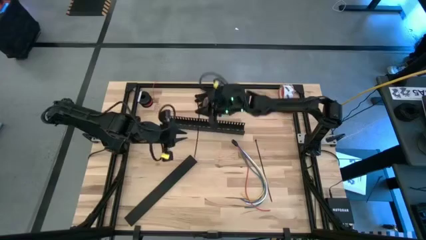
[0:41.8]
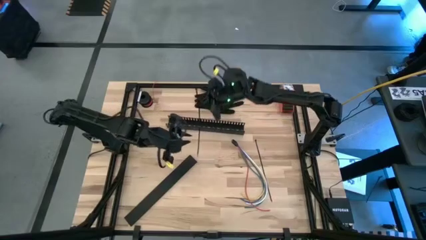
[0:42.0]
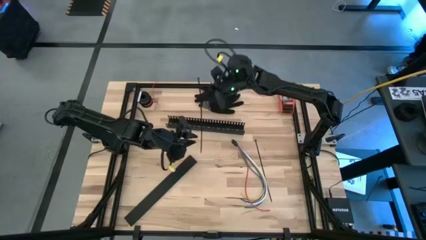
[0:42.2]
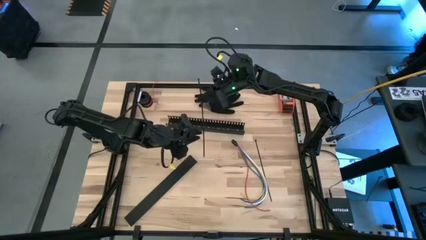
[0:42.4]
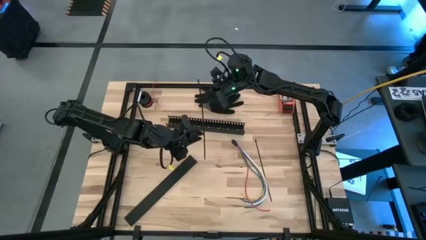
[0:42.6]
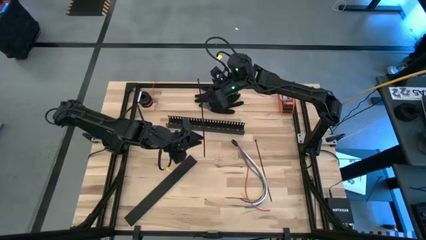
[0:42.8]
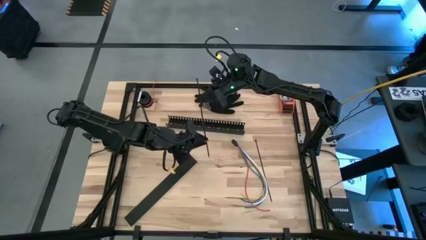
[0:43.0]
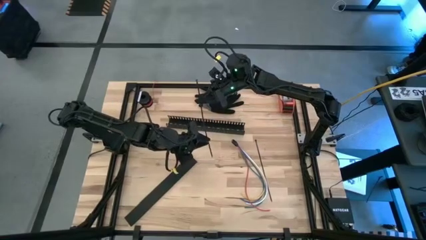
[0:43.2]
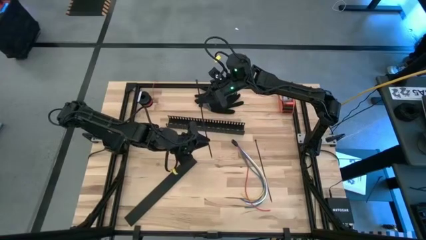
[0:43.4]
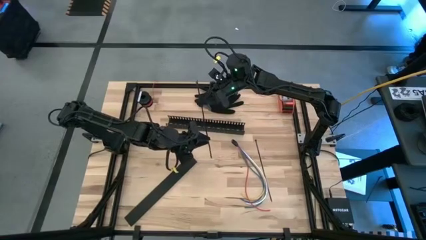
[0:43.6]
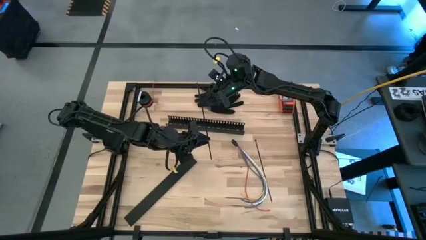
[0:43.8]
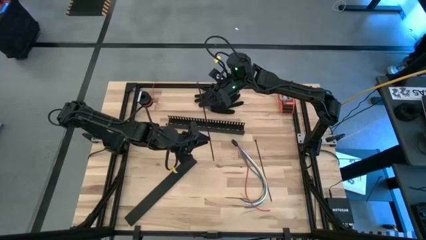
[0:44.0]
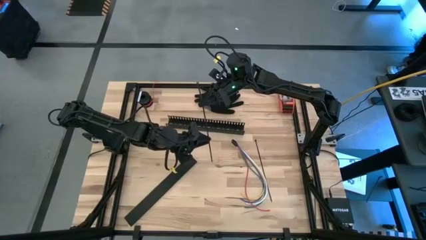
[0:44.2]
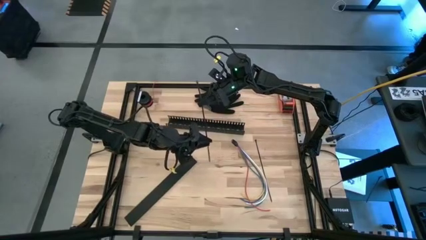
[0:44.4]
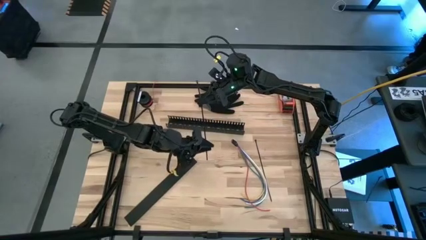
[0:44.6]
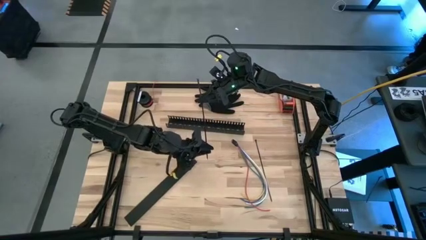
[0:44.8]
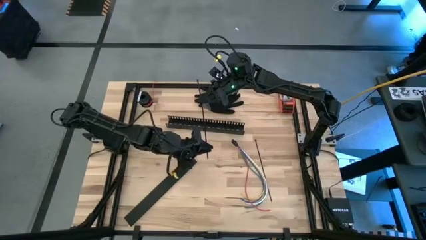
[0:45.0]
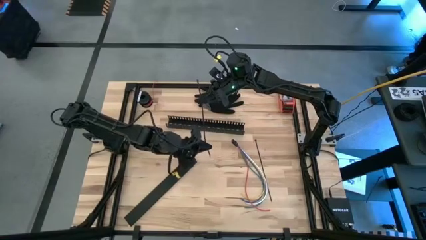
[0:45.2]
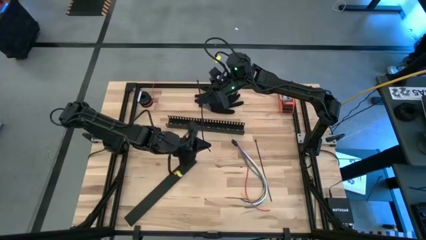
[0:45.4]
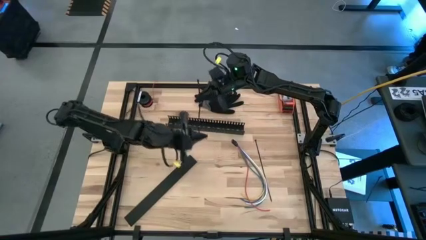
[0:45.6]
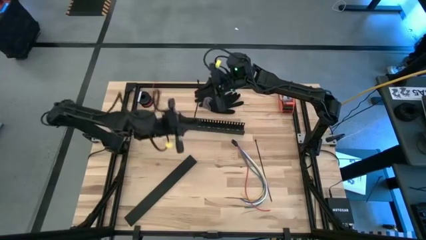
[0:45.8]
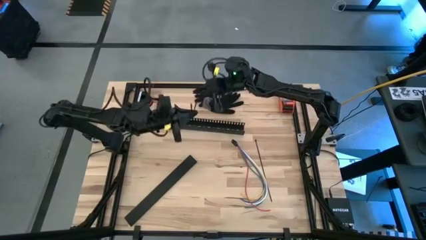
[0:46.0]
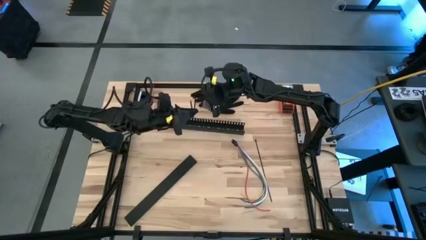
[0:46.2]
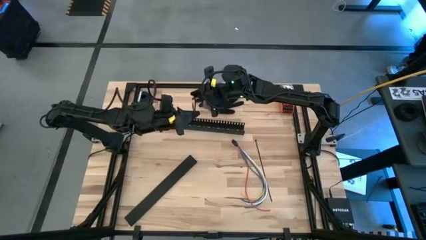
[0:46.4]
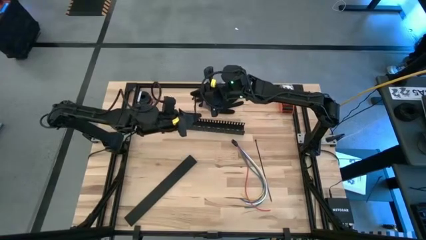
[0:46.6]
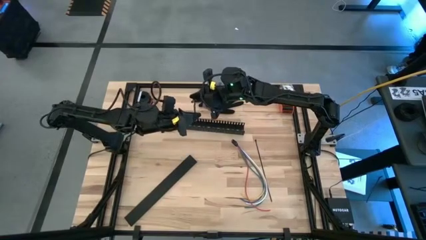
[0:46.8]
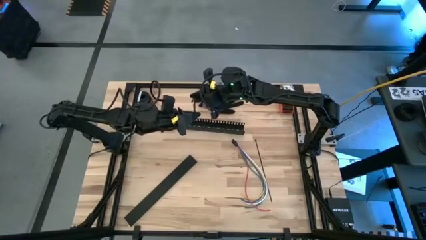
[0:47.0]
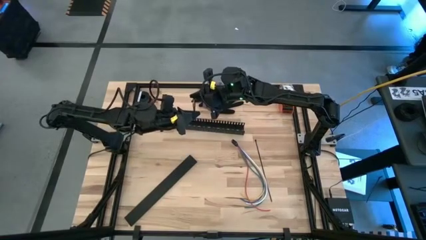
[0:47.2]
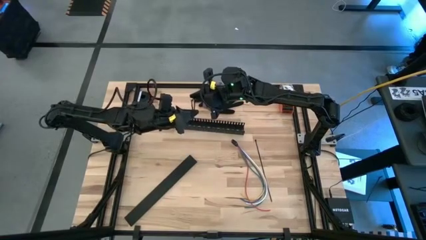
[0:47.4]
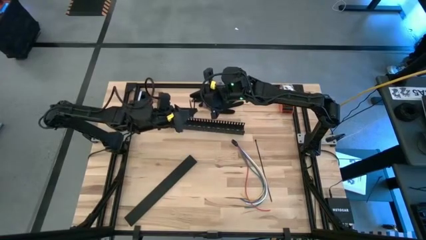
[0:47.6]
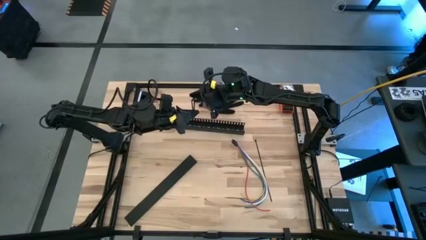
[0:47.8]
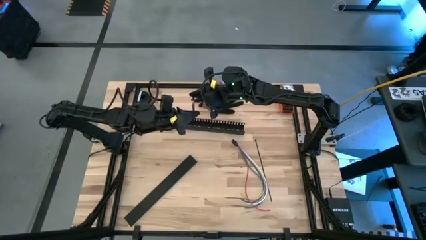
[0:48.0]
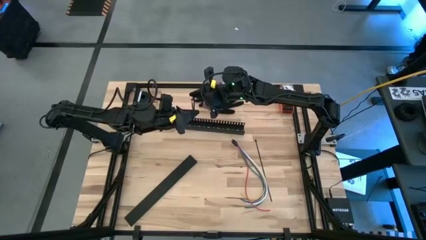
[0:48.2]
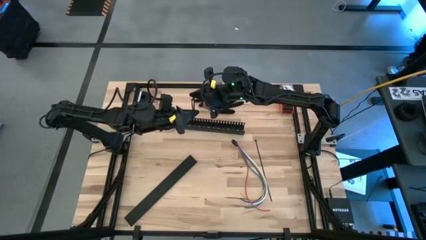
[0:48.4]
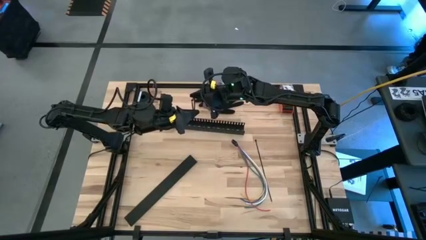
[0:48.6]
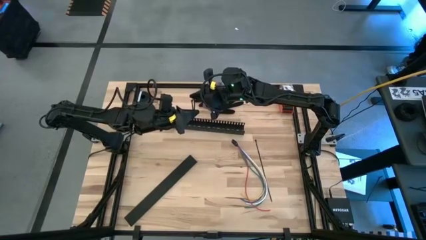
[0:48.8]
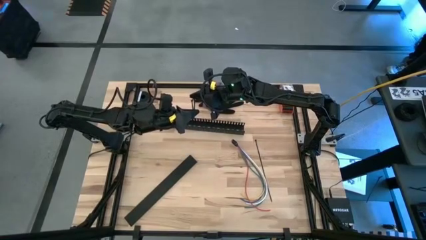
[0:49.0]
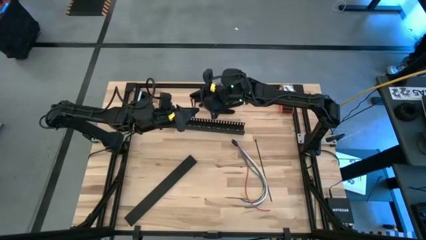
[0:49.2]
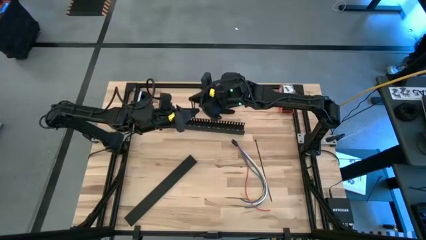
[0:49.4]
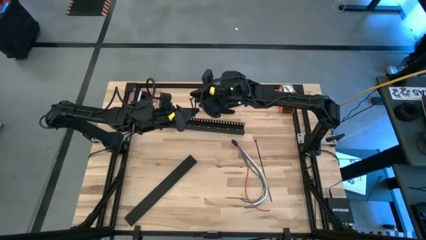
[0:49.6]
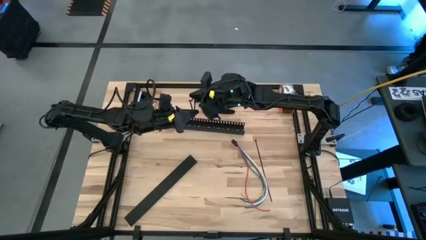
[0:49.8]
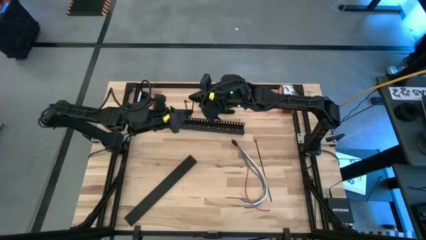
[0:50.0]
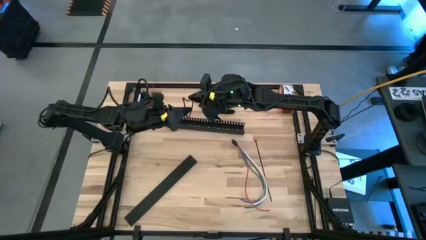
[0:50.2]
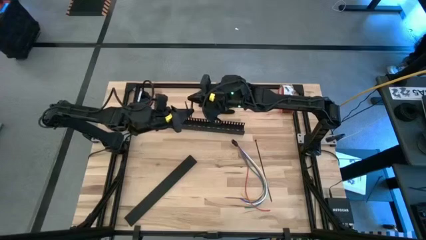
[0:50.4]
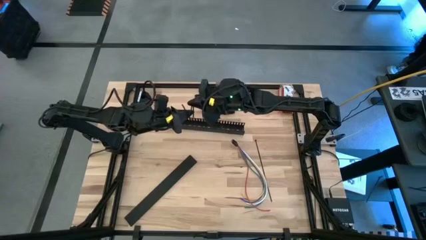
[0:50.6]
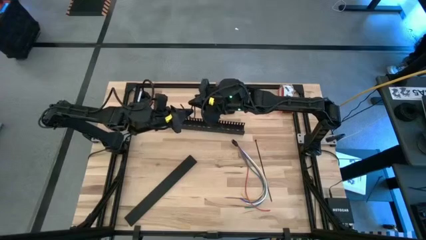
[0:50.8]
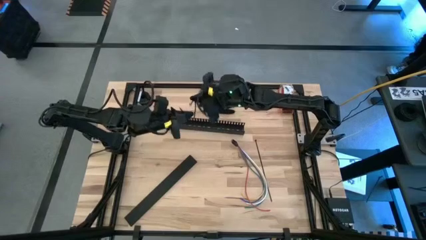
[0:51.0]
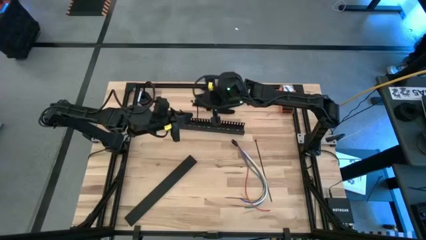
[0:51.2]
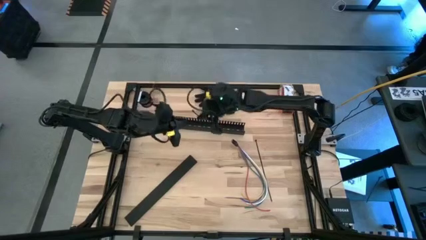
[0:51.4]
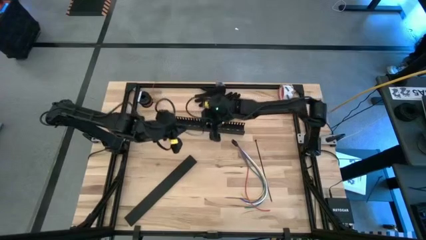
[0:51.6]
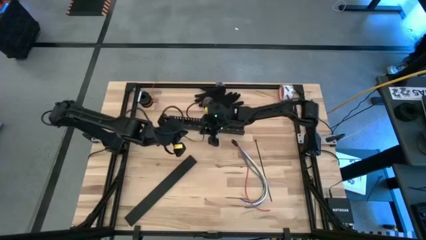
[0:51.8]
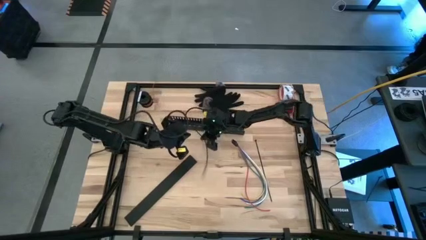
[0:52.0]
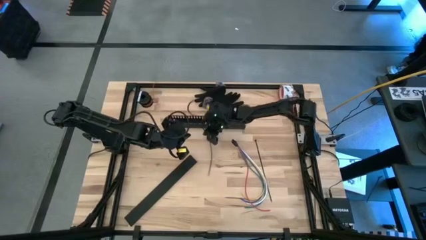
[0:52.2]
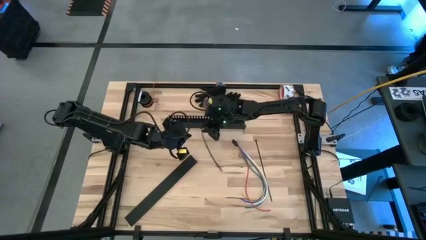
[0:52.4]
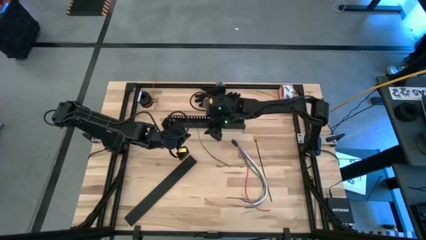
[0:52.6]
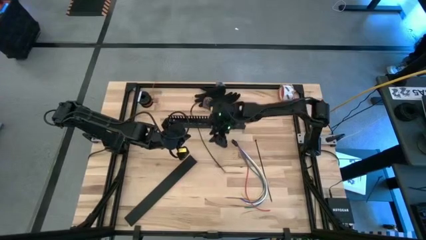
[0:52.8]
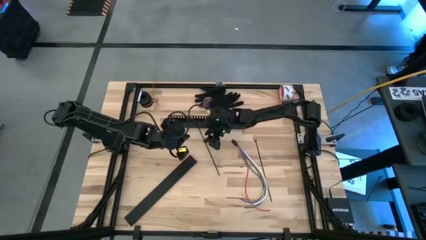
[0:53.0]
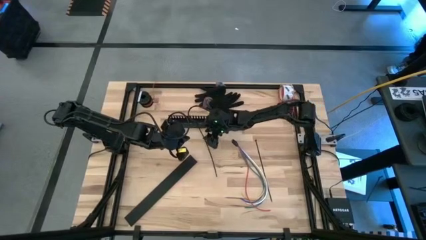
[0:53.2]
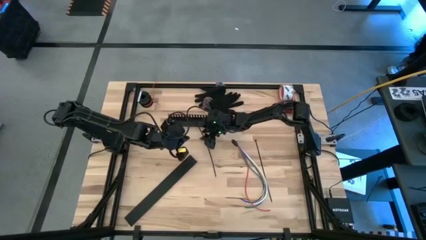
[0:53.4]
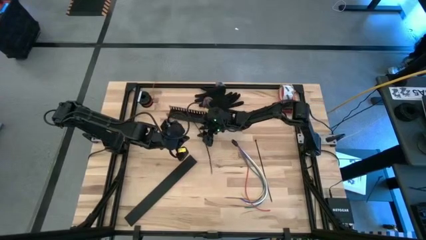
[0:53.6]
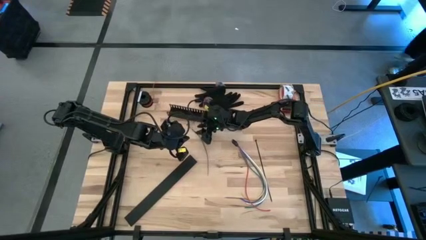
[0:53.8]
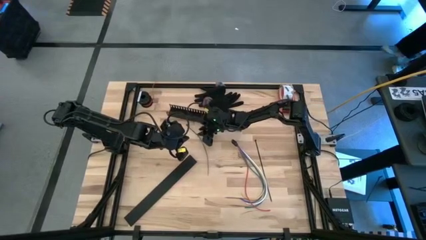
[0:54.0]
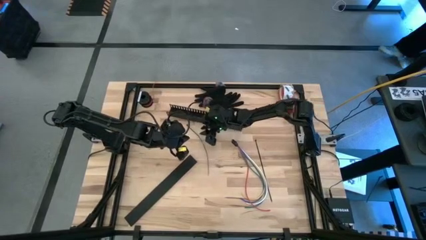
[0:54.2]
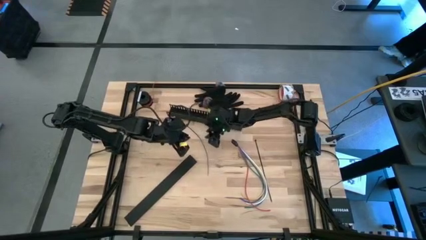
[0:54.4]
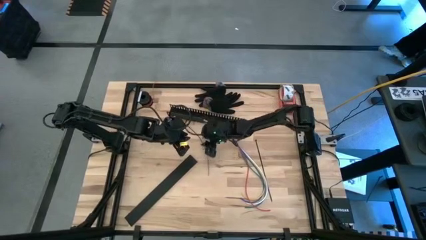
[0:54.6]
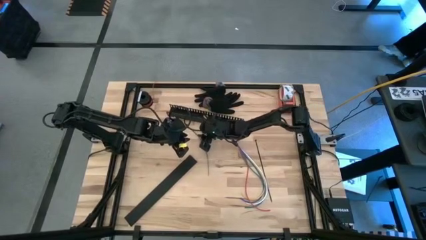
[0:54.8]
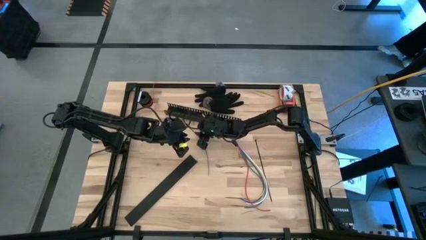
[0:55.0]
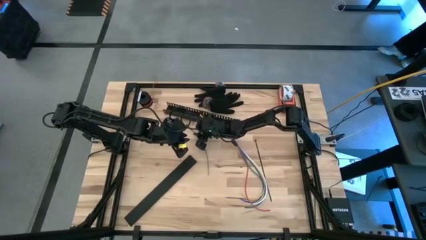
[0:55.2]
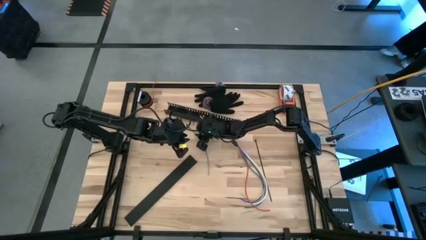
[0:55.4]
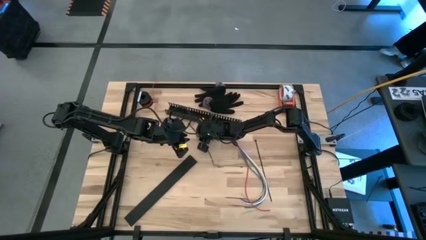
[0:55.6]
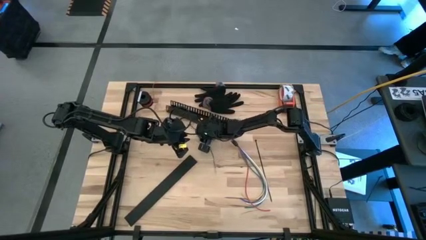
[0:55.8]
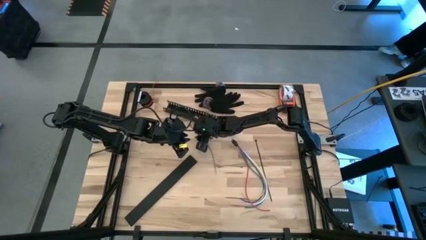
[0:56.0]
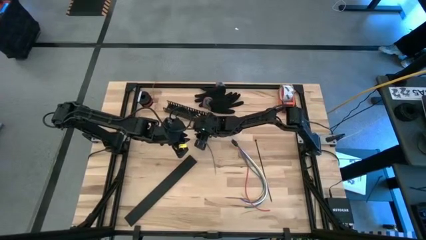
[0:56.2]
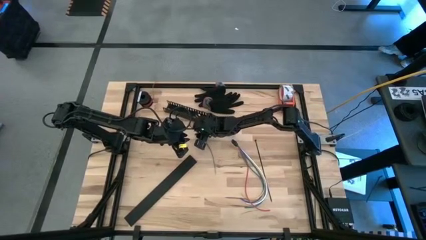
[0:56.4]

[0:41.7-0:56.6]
Task: Ziptie cables
Prepare the black zip tie
